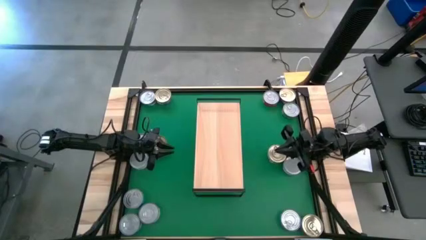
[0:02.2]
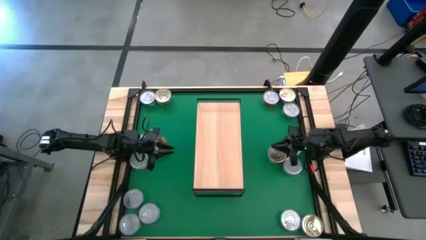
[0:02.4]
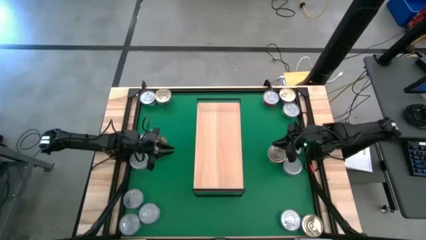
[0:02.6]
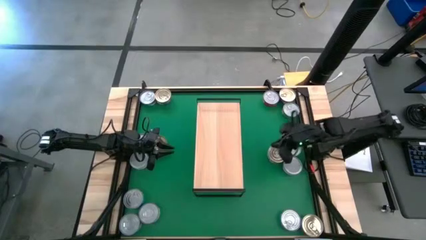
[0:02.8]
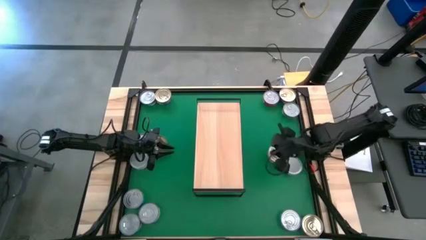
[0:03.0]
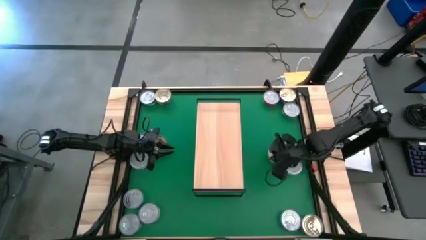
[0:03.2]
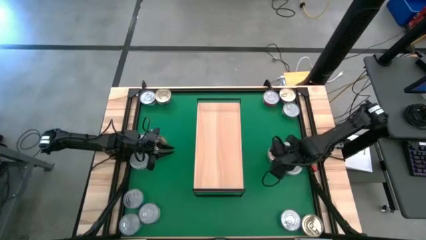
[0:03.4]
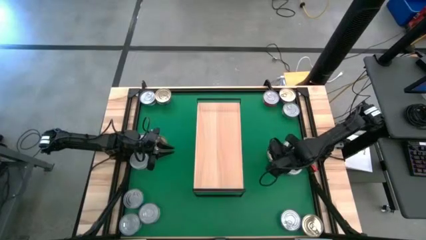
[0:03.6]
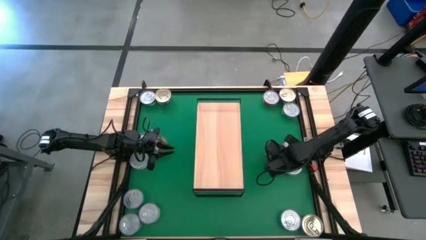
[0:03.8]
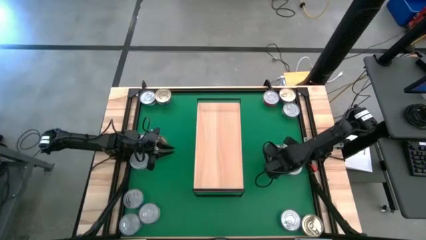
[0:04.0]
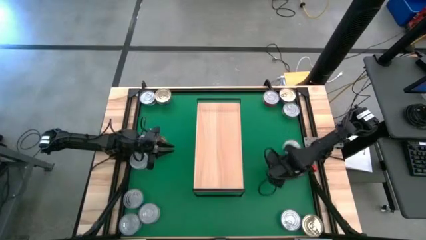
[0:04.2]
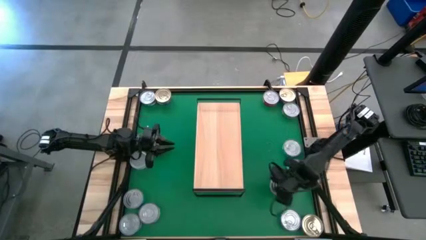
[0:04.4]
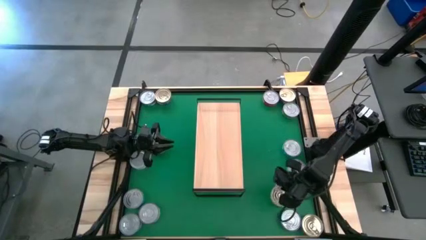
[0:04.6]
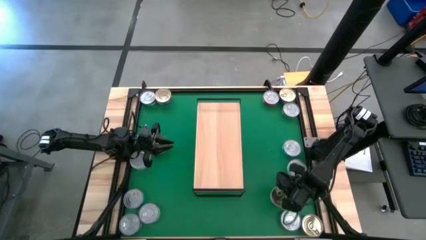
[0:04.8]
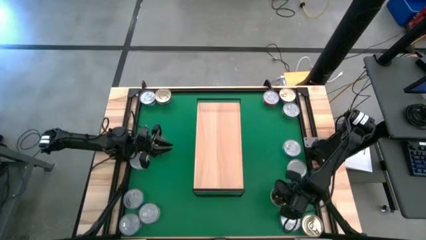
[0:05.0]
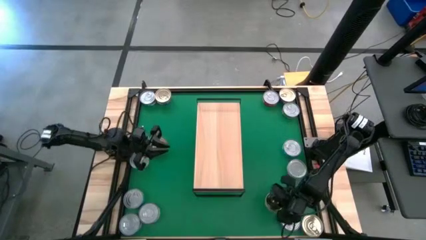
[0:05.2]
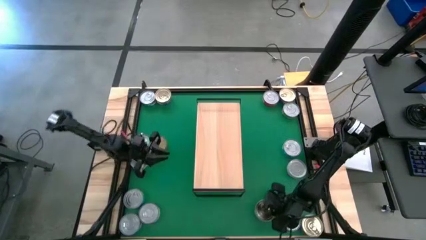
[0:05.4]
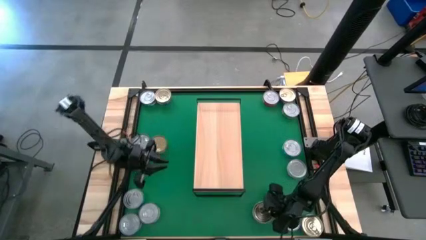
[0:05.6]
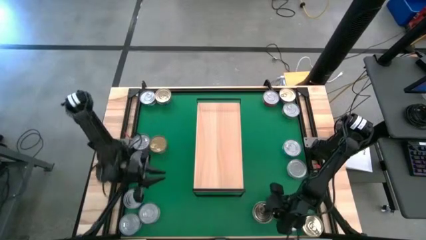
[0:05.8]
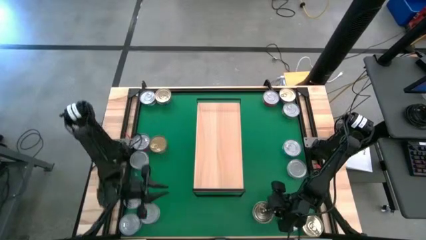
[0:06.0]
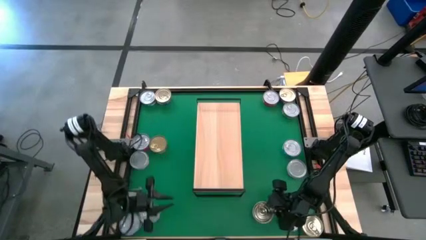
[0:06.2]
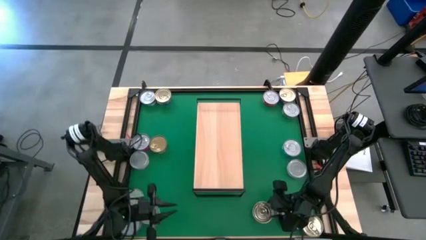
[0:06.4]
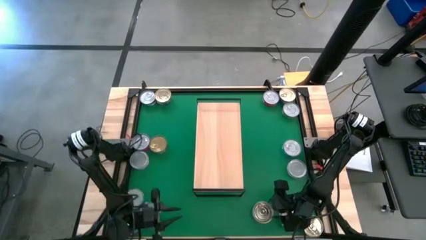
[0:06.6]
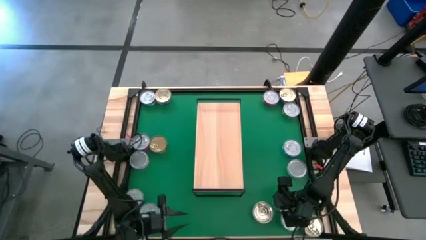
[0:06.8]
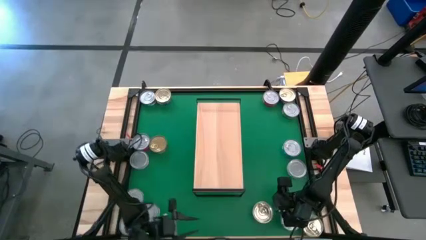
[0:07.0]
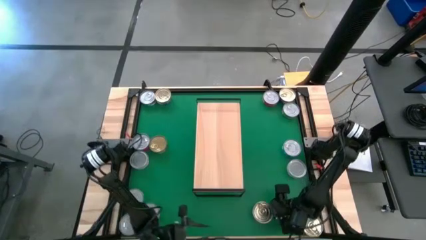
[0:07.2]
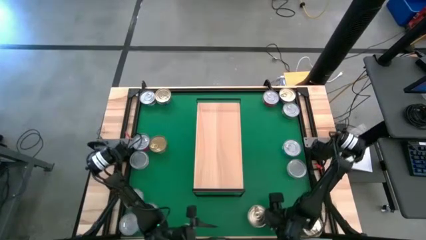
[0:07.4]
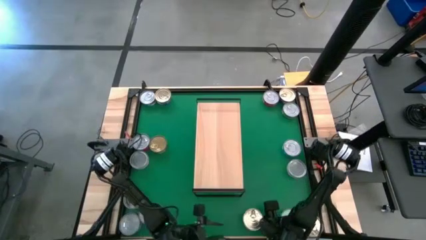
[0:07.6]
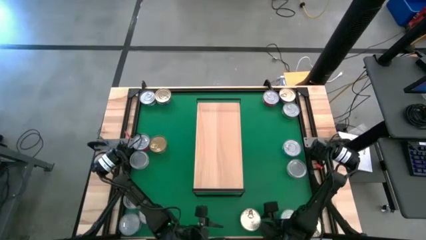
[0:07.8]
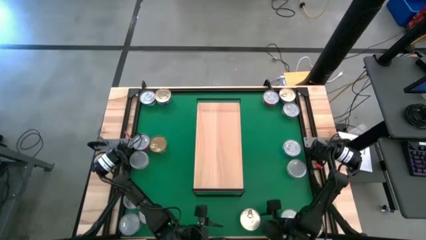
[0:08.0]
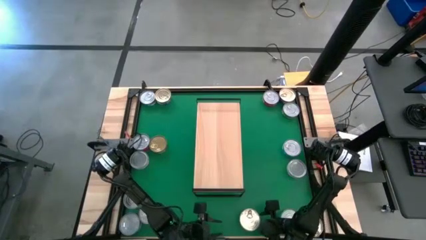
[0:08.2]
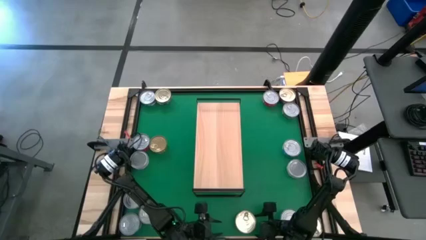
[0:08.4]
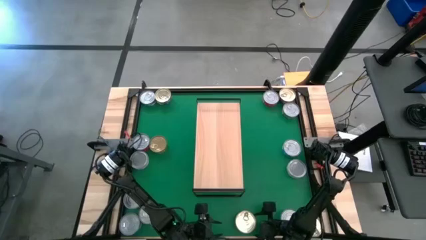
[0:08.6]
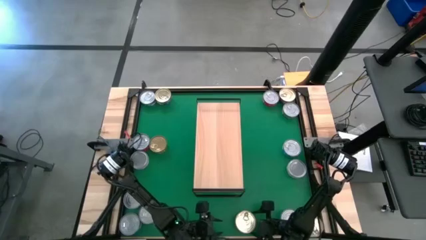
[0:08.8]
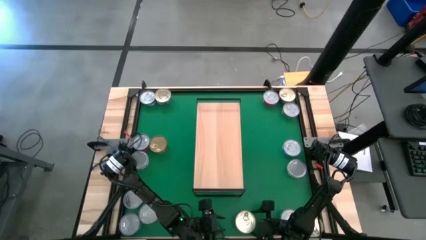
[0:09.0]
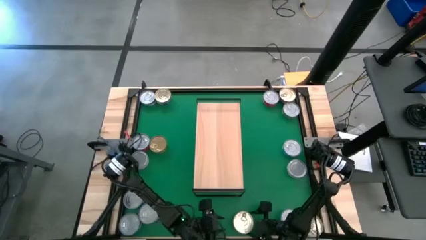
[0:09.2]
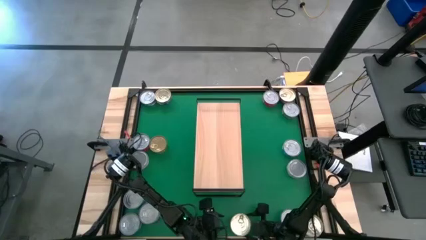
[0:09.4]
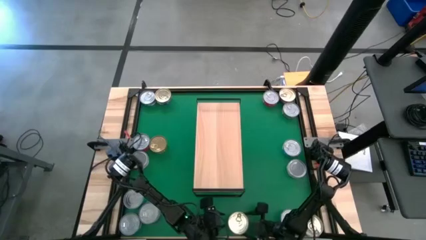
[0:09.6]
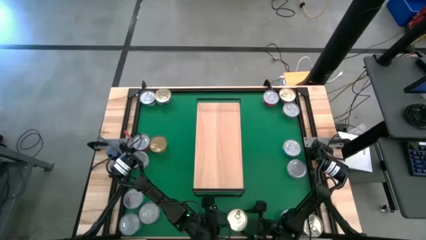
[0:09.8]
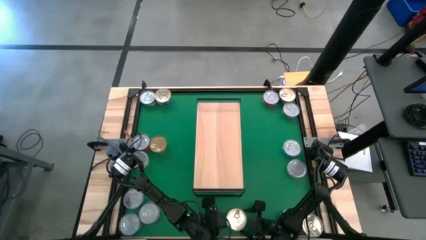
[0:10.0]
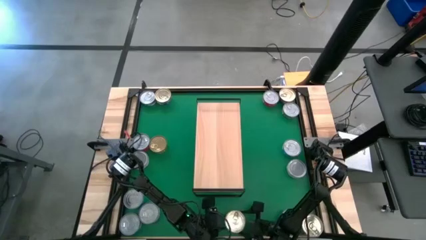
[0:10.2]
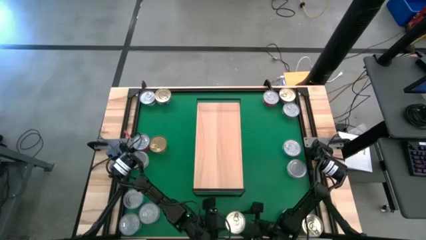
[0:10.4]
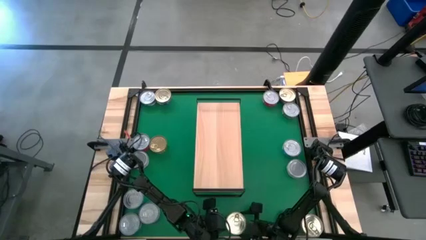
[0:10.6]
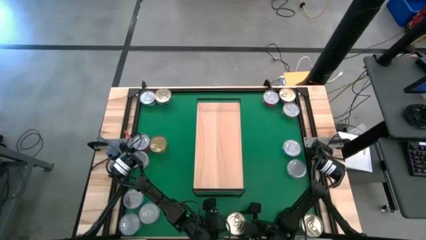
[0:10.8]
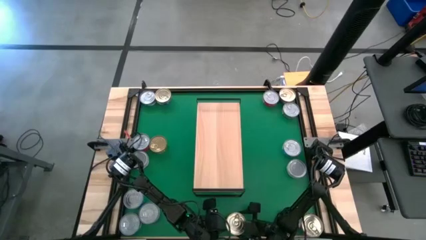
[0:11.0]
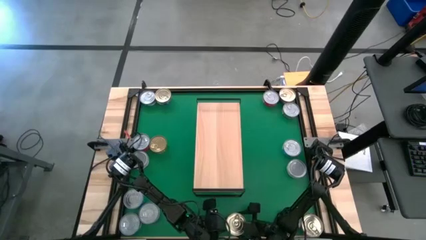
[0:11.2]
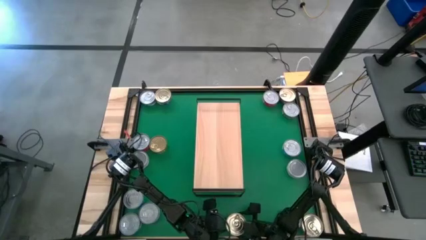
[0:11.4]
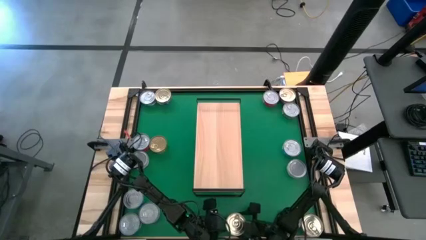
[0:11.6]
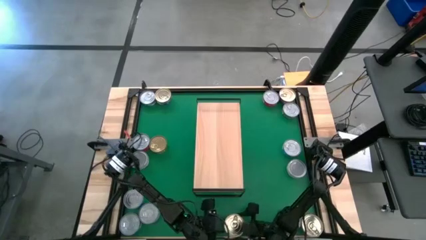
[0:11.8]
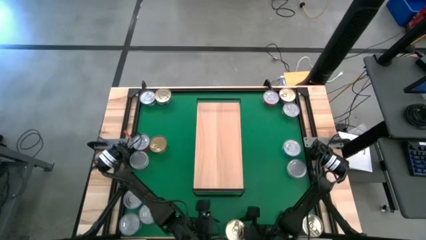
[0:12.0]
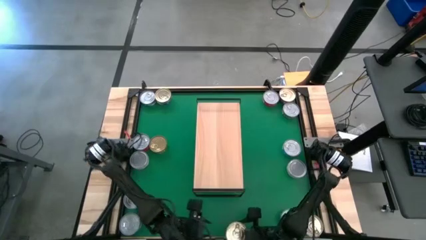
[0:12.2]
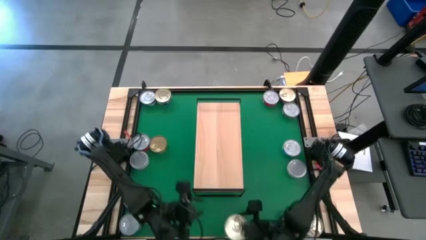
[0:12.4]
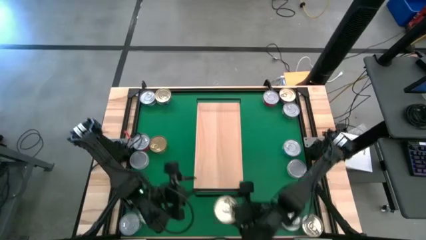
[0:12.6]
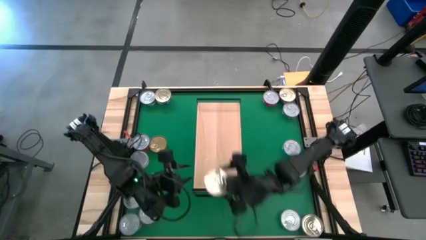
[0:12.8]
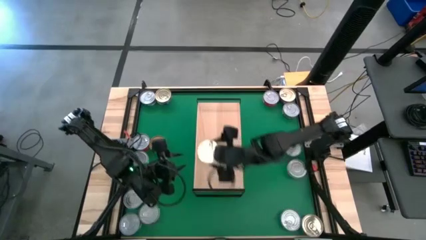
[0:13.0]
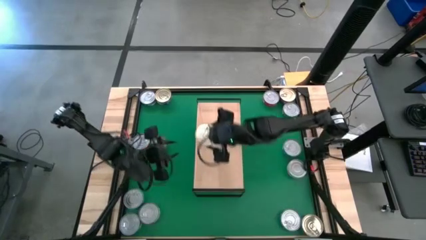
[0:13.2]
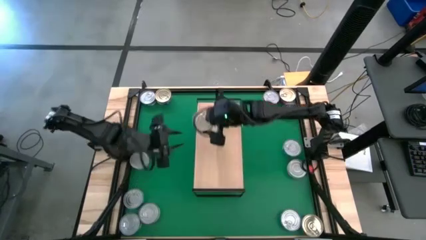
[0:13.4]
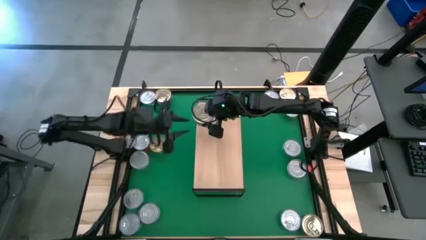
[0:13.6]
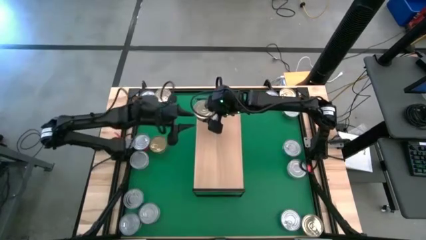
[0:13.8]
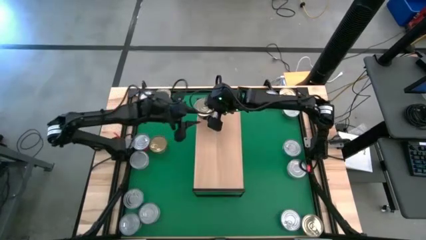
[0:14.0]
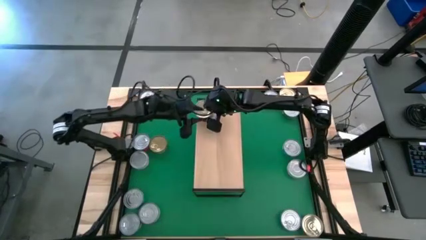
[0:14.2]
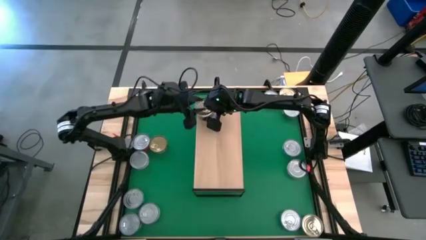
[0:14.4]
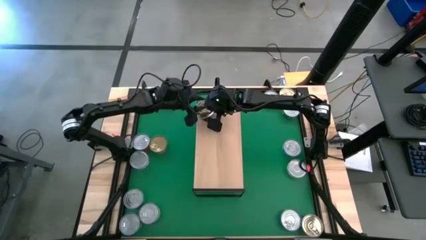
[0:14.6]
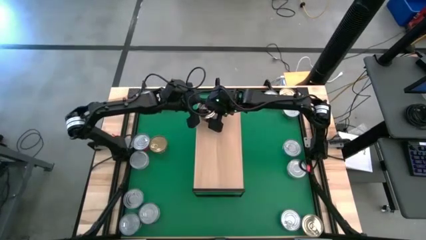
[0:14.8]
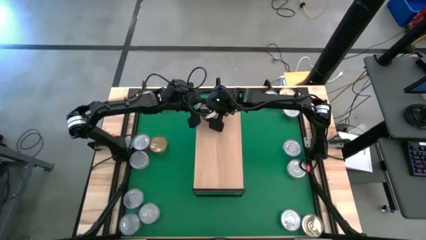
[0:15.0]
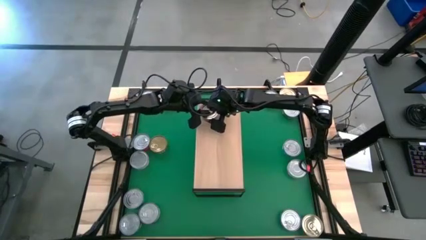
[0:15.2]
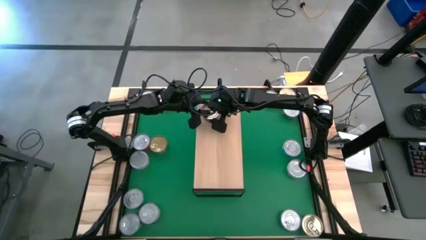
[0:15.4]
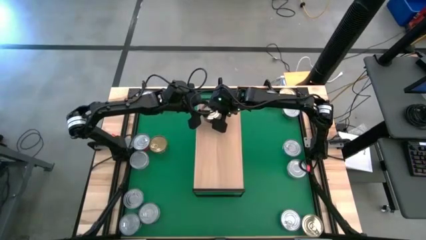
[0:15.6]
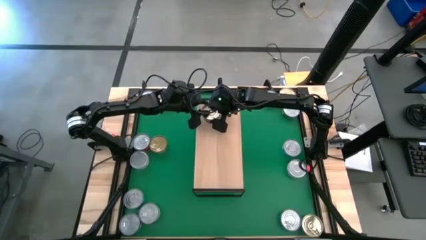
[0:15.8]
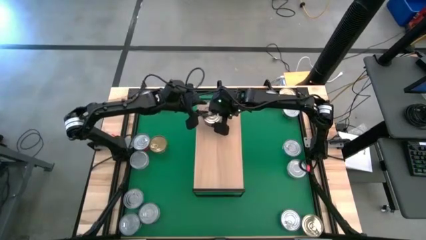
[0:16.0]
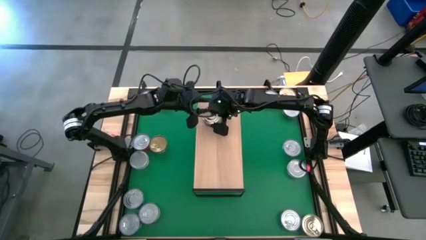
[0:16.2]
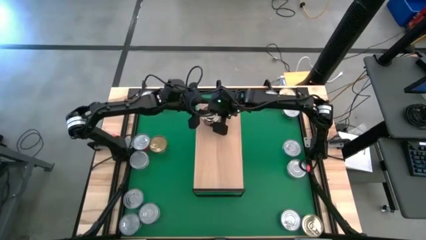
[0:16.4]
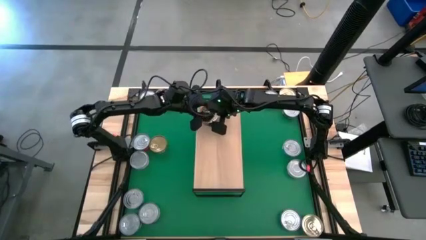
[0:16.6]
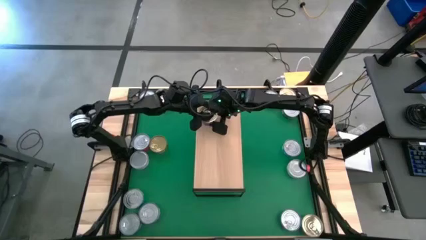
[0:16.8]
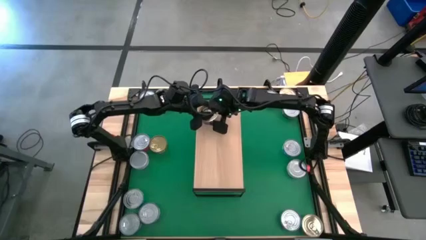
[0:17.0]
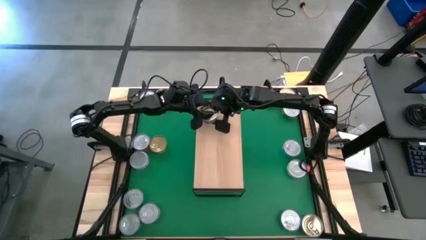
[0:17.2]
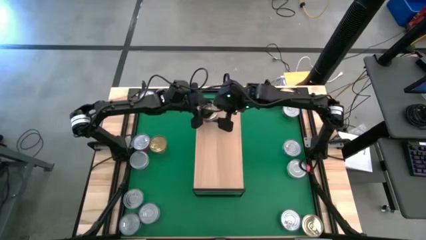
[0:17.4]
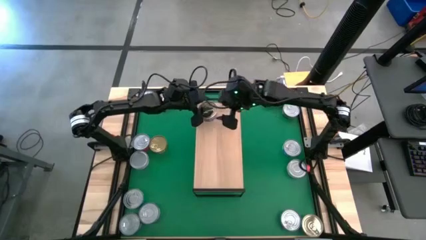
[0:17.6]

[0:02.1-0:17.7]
Task: Stack canned seafood by type on shelf
Put the blue pink tuna can on the shelf
